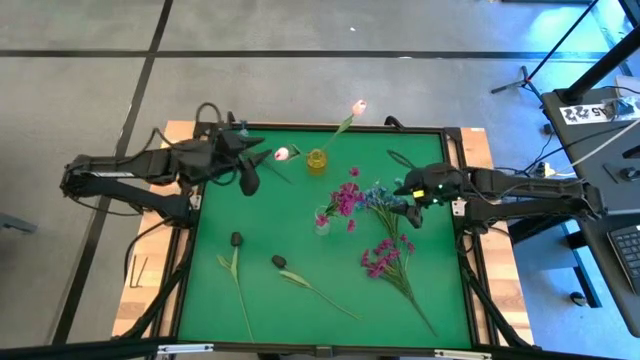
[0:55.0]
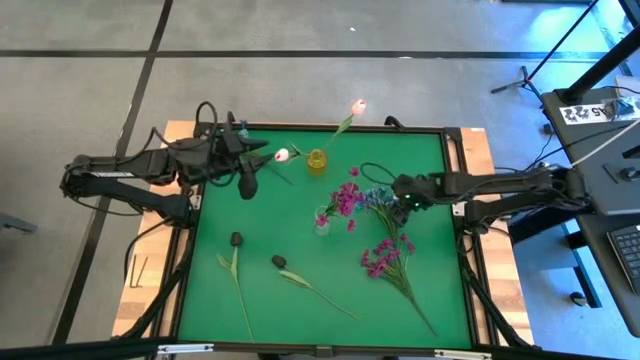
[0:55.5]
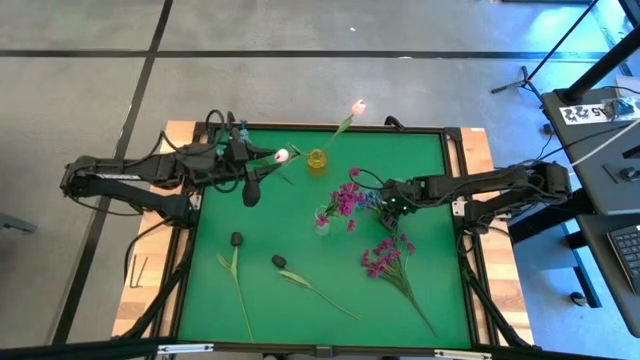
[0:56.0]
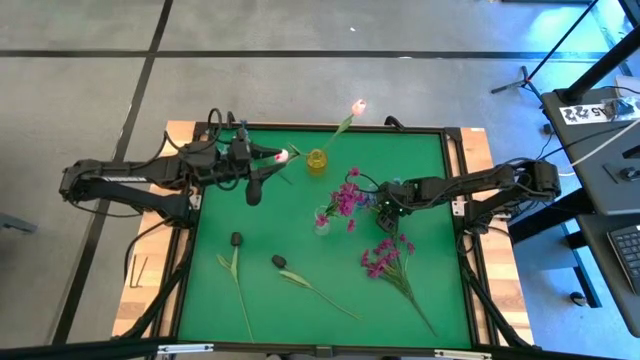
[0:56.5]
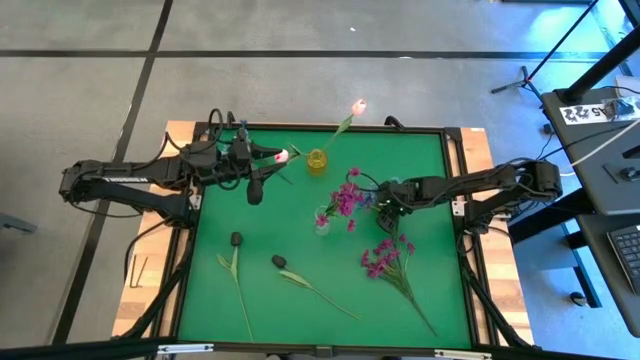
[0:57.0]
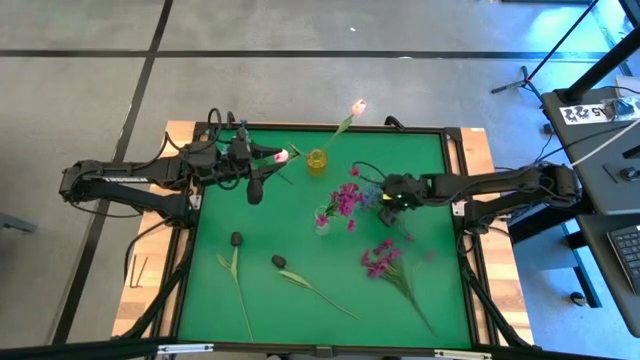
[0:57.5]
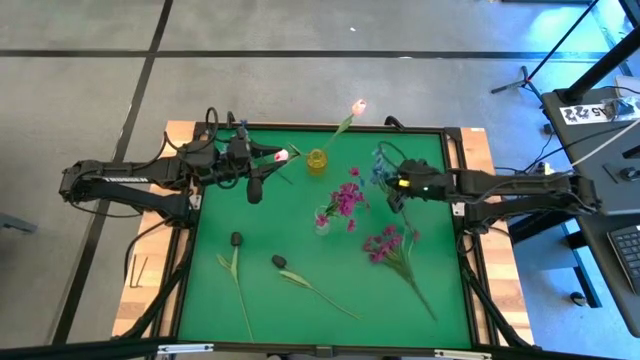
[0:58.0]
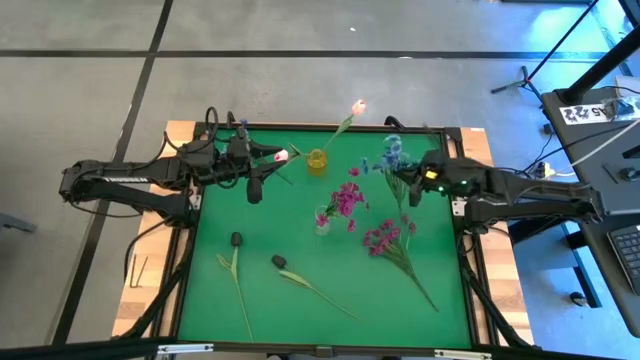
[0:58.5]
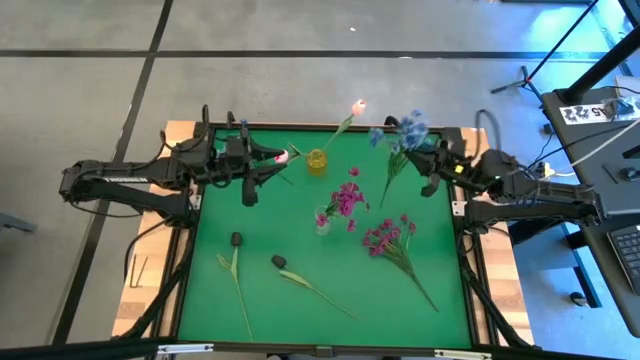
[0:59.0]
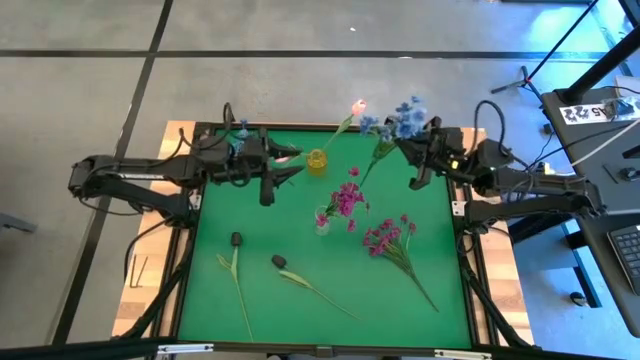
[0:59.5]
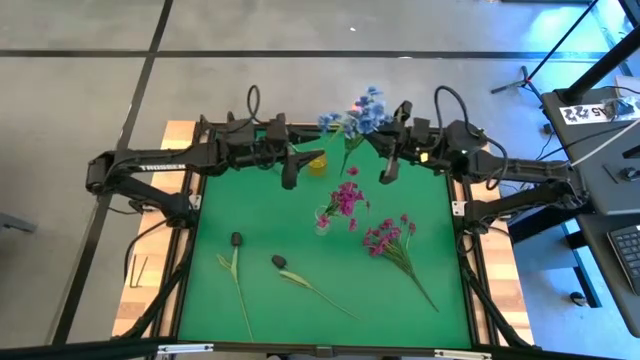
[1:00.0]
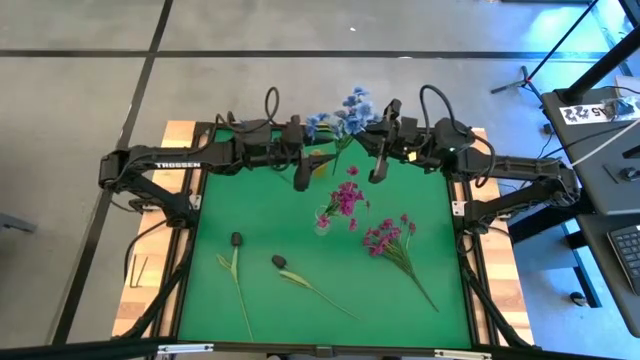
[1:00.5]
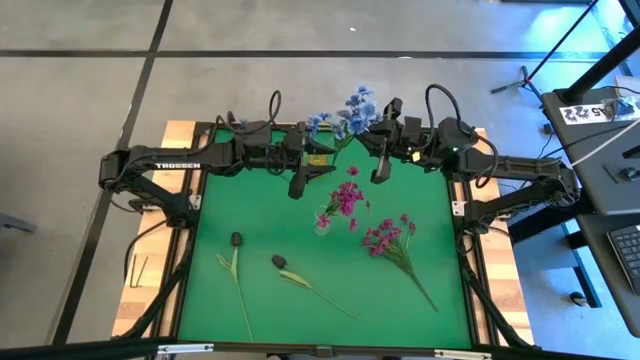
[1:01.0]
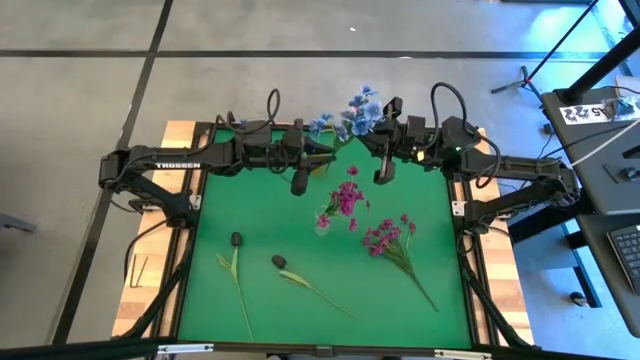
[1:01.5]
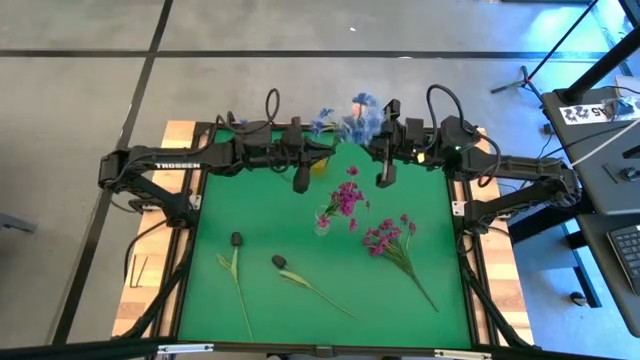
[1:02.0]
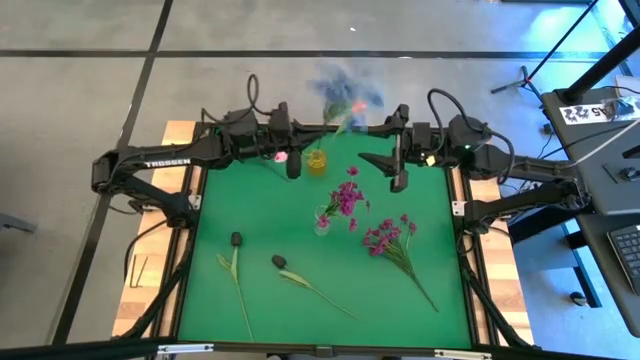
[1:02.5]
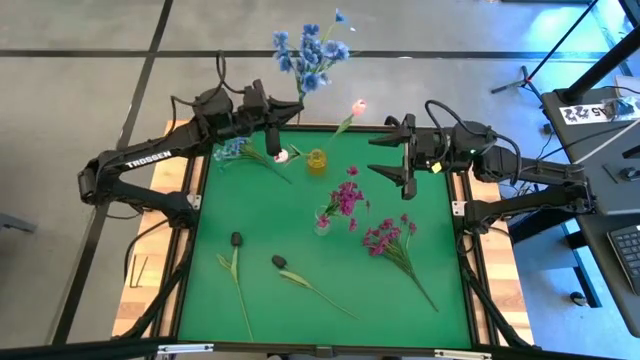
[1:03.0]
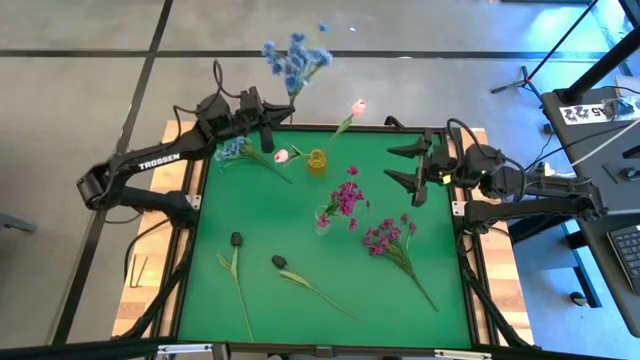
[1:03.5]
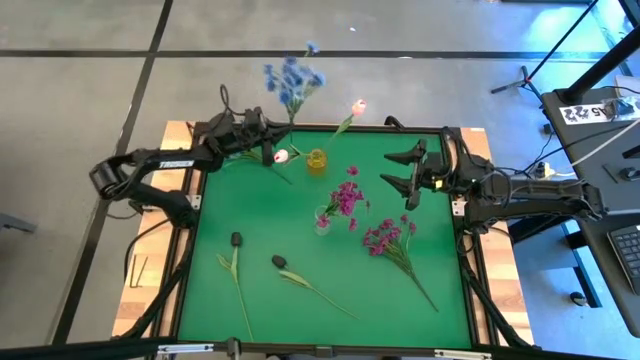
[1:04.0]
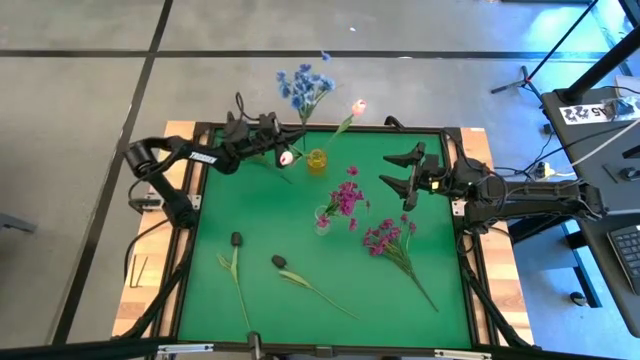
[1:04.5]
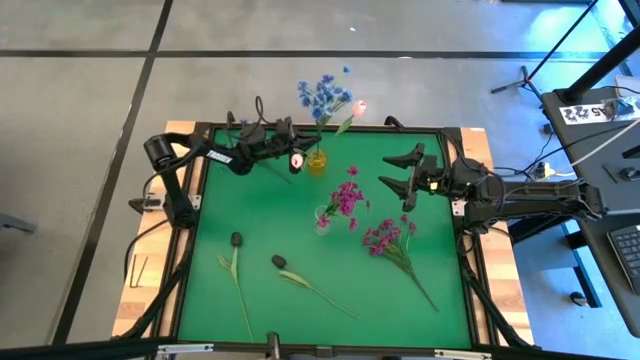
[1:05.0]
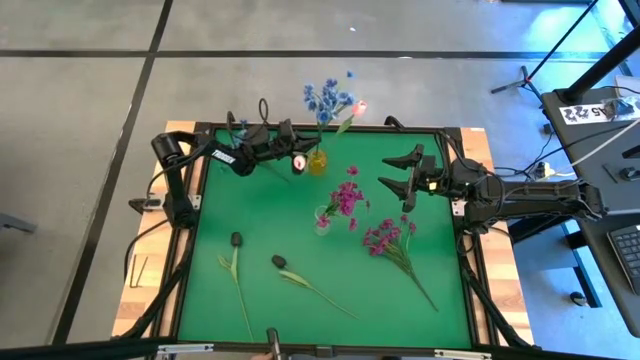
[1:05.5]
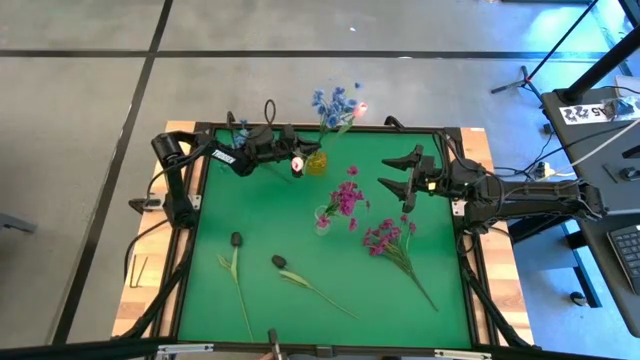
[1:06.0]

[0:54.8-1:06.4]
Task: Sort flowers into vase by color
Put the right blue flowers into the yellow vase

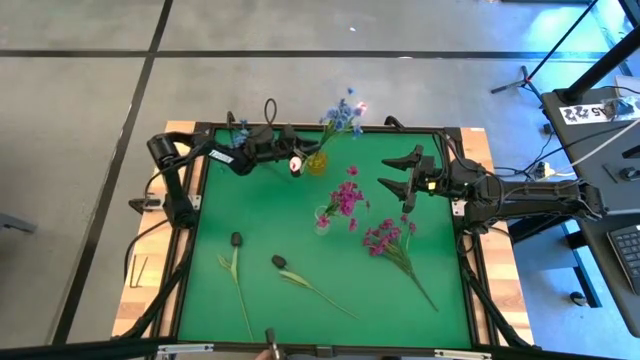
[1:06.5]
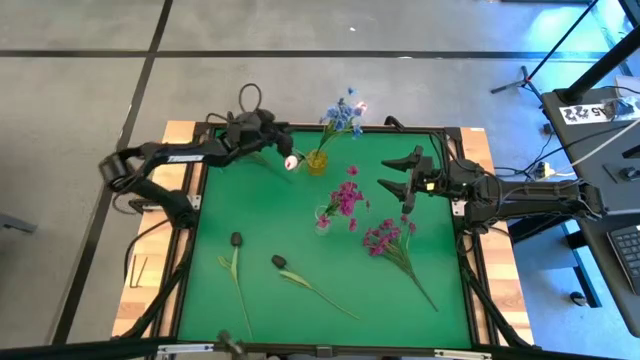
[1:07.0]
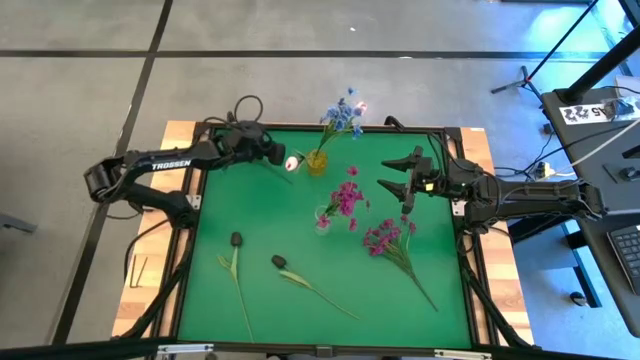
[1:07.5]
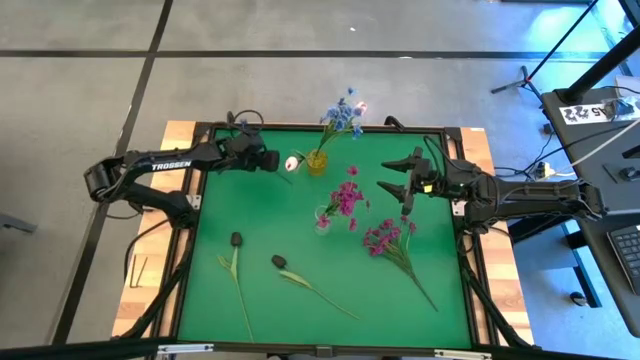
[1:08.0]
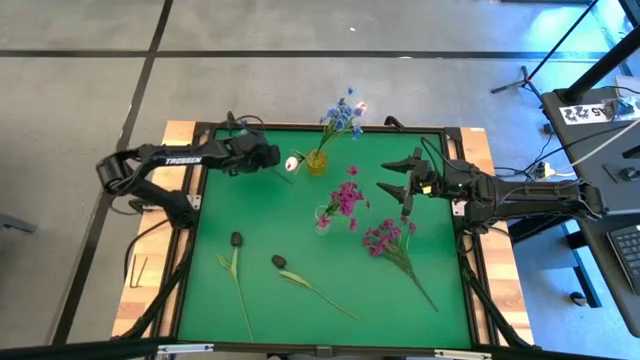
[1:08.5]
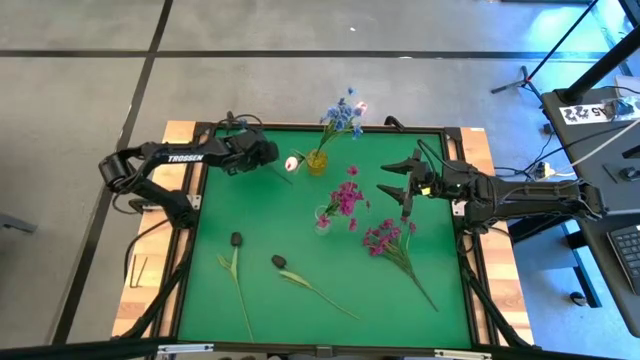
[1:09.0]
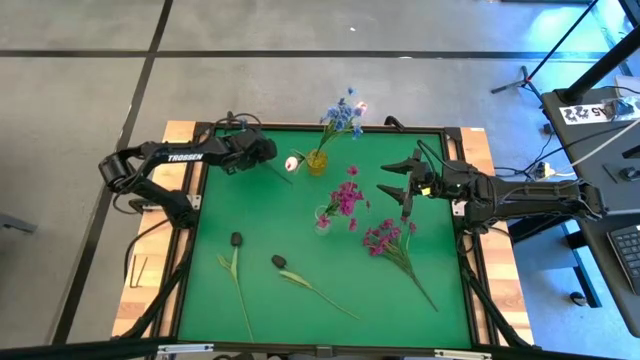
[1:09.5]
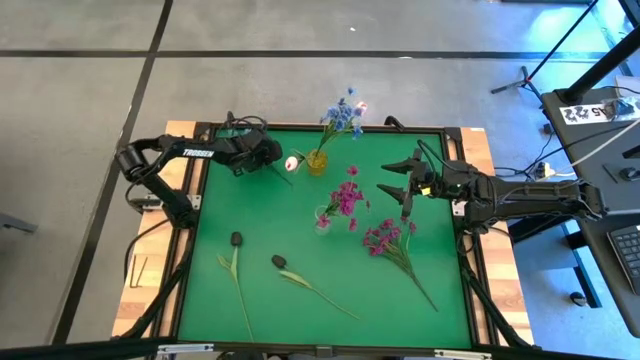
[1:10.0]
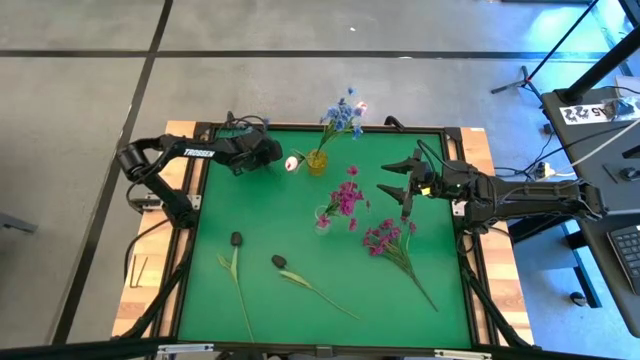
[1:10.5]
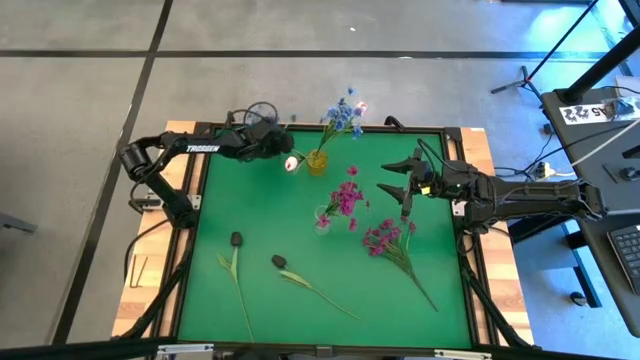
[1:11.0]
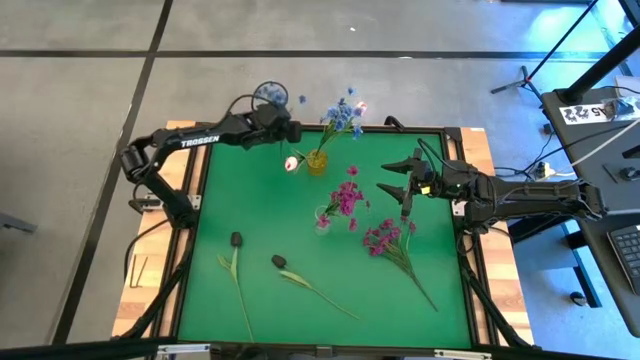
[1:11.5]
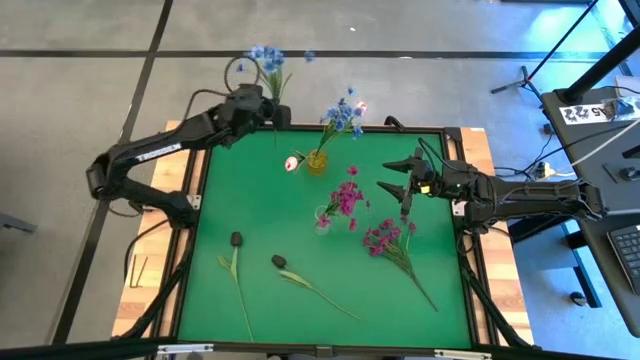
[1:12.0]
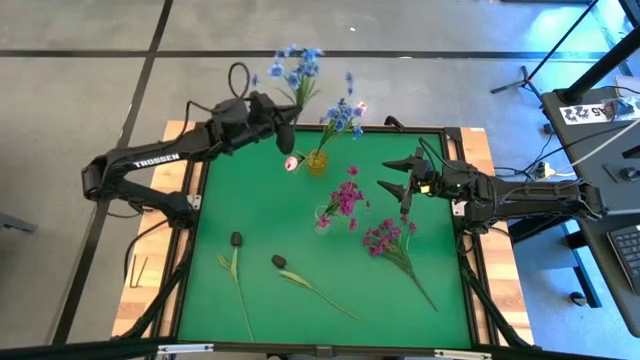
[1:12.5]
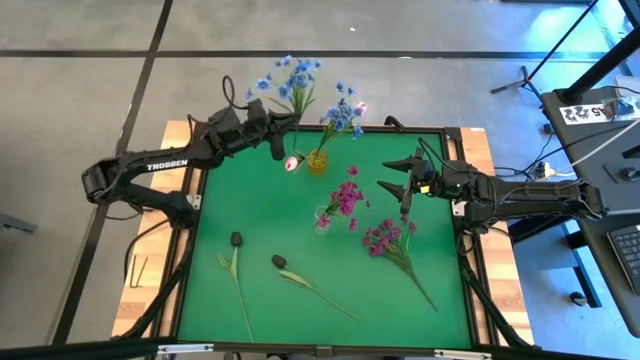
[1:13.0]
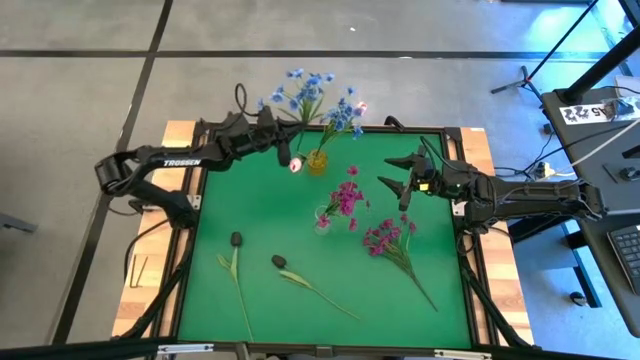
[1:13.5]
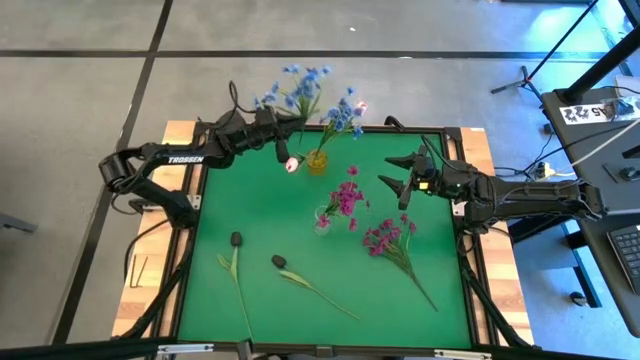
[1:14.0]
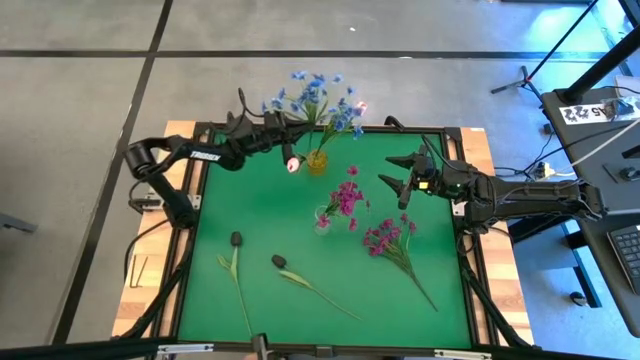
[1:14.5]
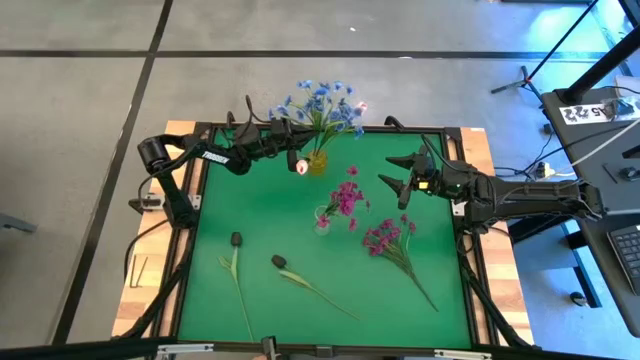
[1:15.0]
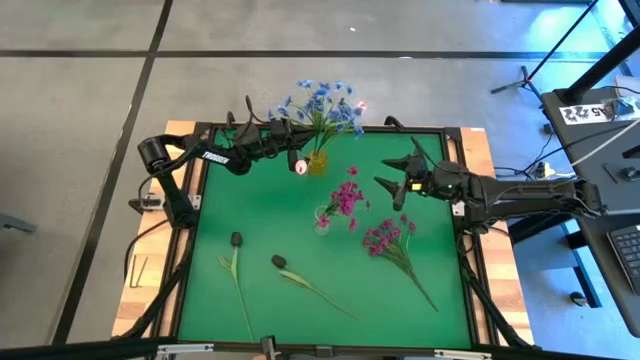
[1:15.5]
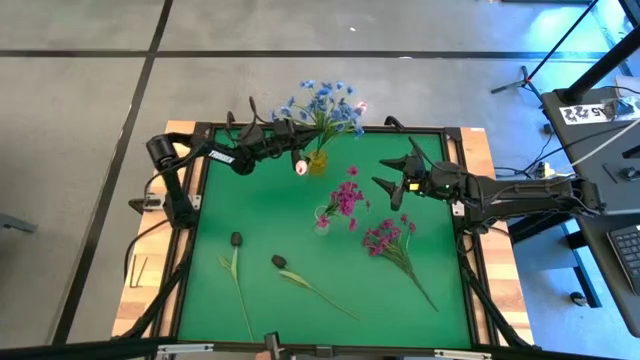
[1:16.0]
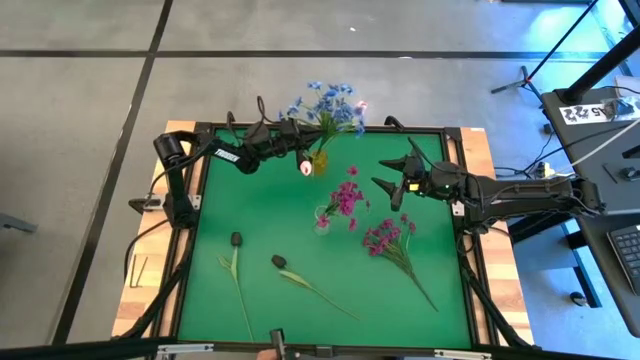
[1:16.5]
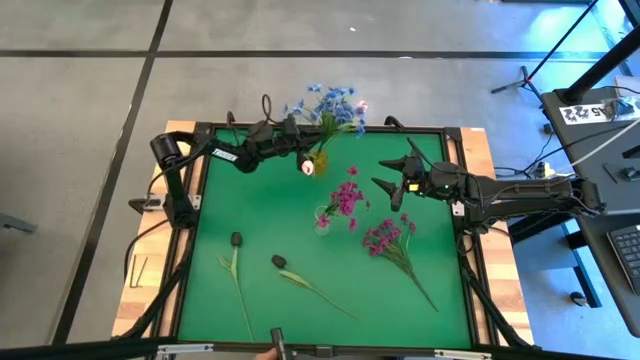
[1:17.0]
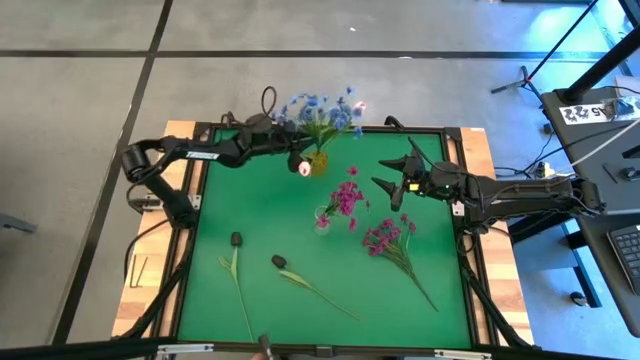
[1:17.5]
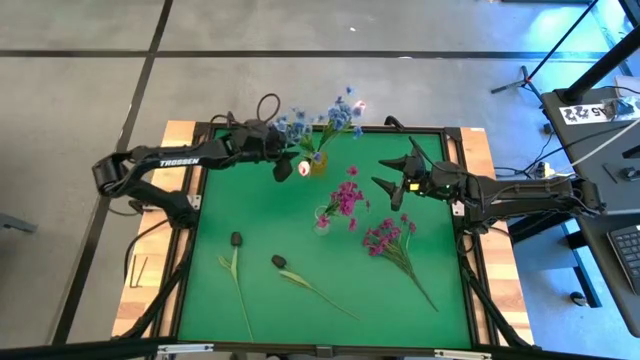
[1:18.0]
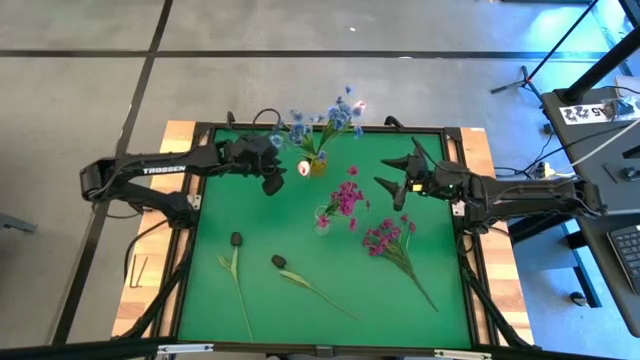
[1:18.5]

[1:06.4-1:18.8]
Put the blue flowers into the yellow vase
